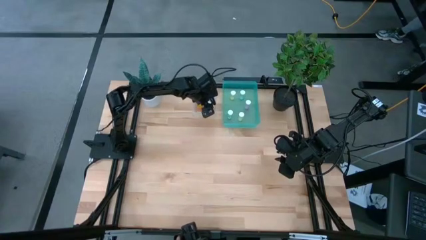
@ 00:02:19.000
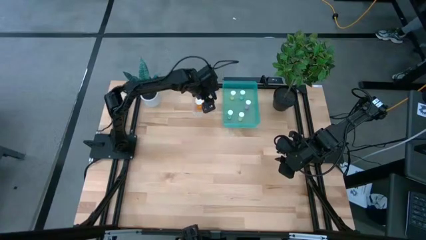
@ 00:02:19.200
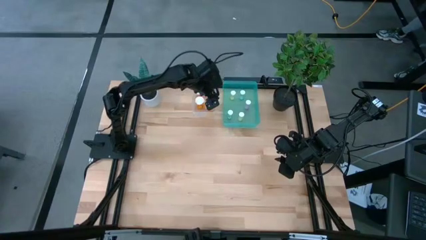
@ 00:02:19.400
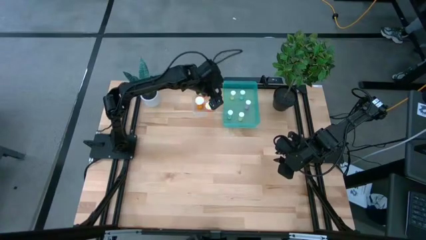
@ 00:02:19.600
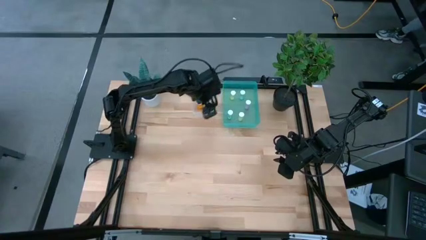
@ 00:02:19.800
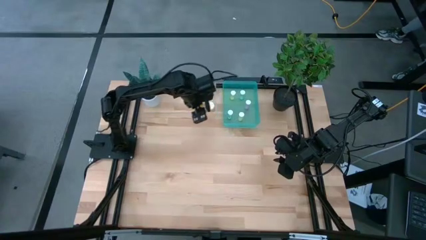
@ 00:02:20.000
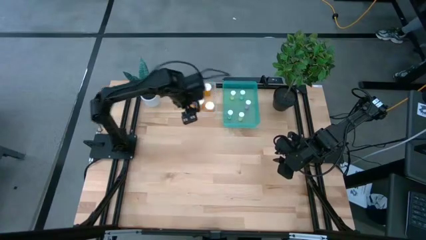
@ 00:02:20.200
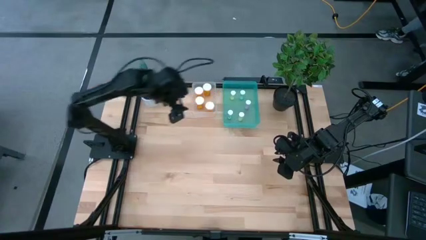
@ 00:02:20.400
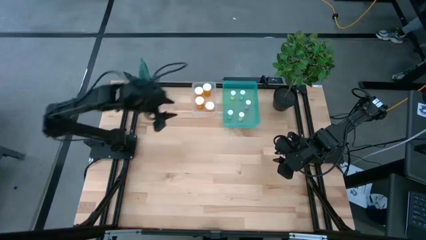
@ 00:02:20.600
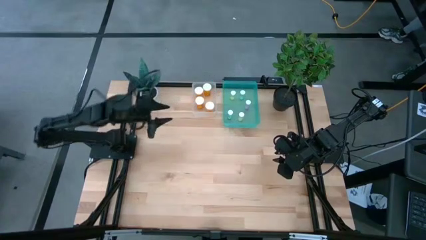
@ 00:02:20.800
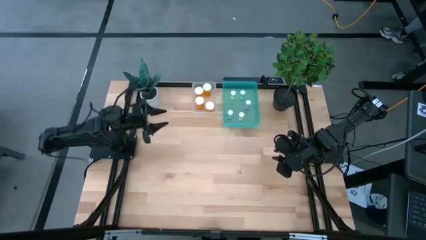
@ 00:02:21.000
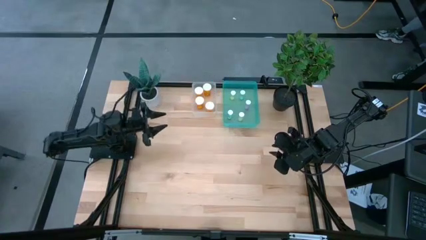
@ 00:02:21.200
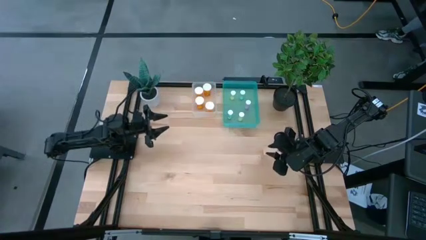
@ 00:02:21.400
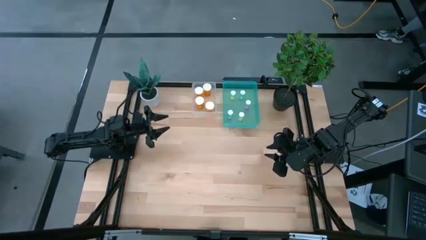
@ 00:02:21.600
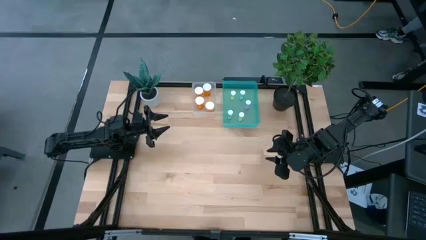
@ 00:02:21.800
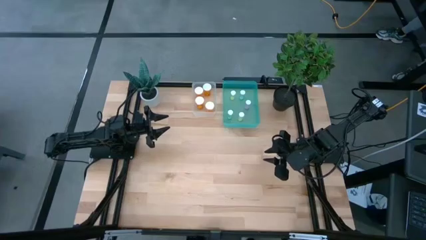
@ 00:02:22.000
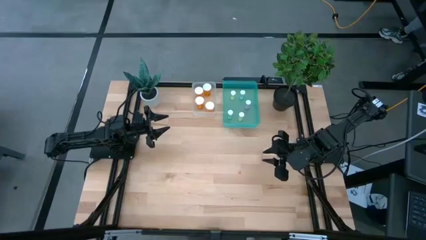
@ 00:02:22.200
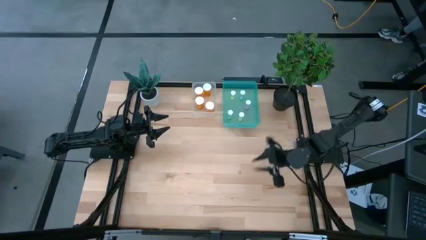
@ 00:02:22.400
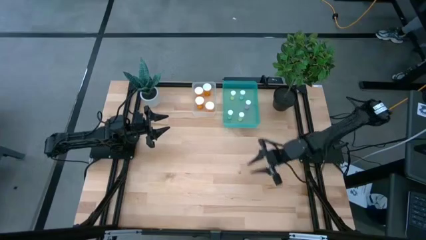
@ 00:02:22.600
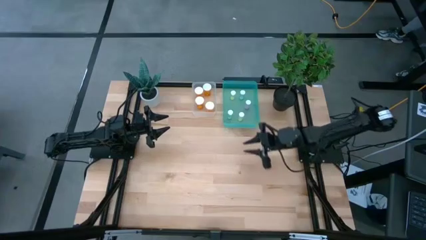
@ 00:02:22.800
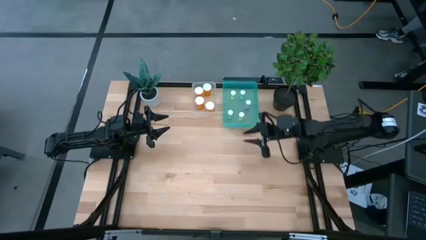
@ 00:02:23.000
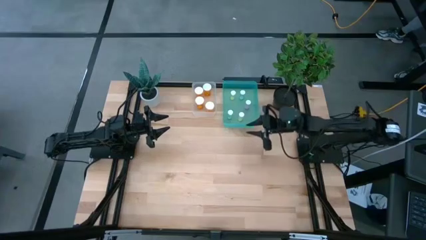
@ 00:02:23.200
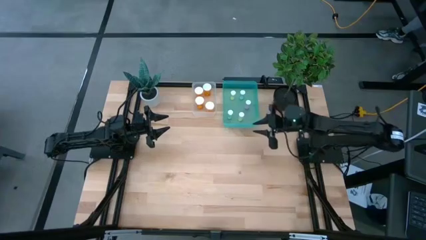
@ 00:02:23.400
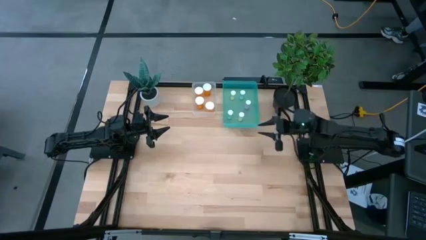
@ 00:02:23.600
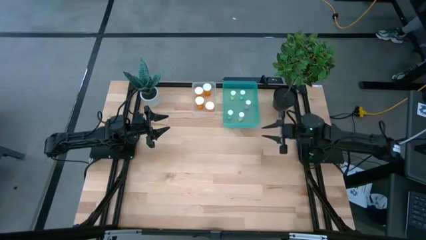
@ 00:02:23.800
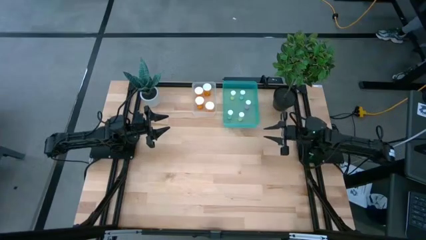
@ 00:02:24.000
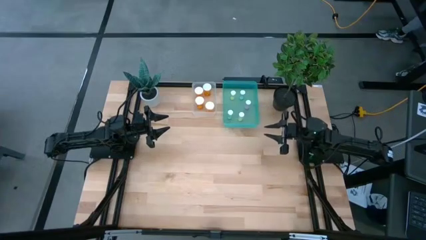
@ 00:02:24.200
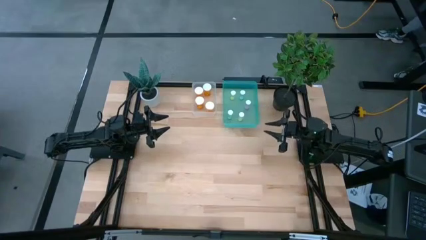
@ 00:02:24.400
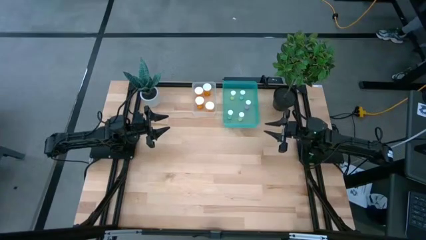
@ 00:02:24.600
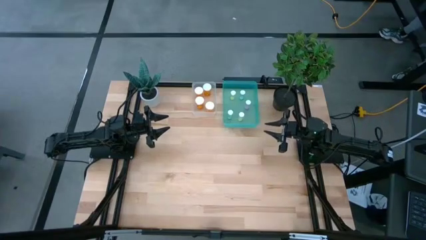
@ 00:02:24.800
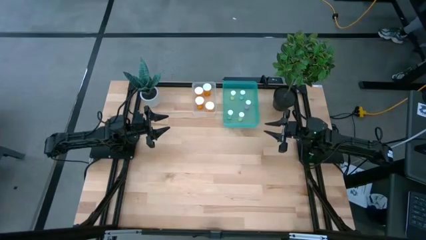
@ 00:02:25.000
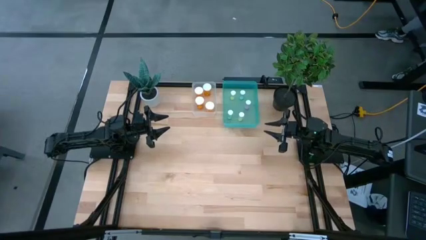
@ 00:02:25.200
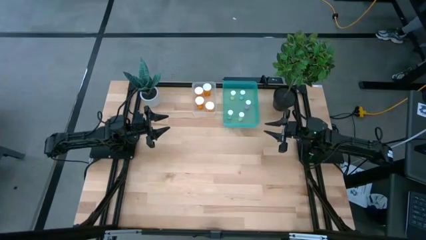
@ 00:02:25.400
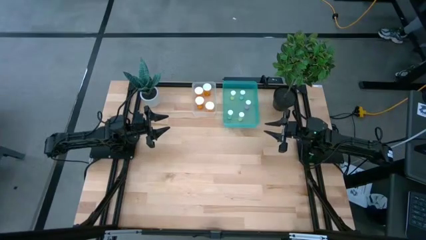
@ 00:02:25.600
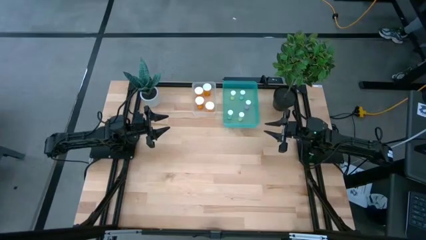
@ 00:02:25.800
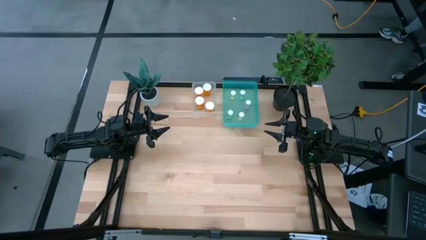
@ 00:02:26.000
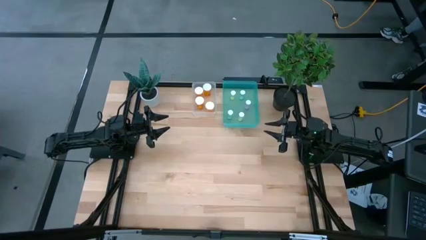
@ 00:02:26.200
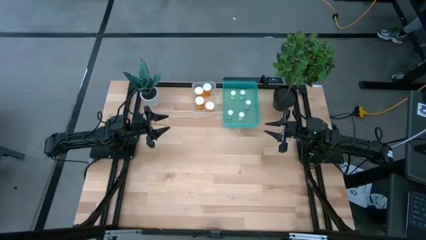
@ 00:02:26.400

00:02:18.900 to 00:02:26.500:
Task: Pick and place medicine bottles into bin by pill shape (circle, oval)
Return to Home Position
